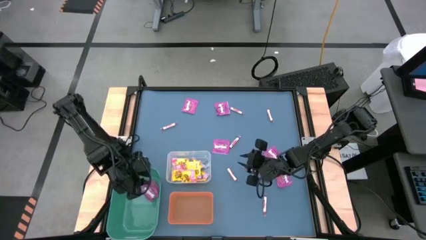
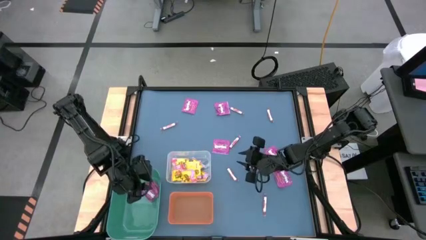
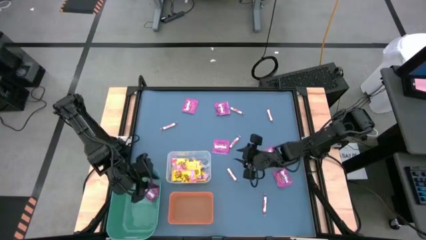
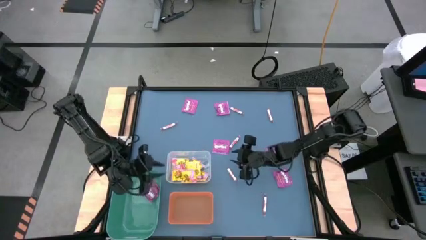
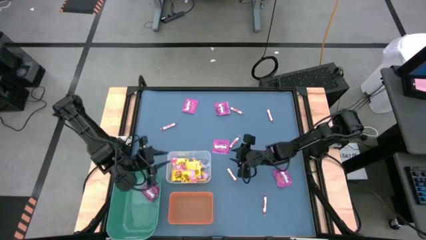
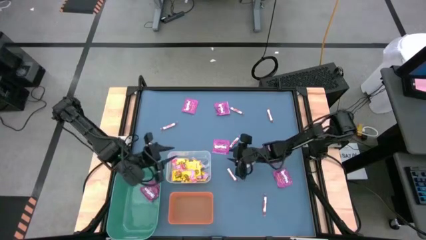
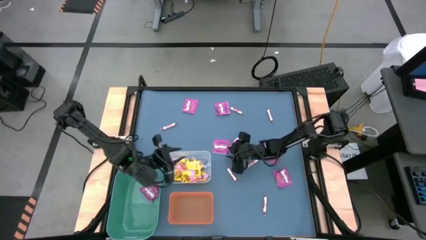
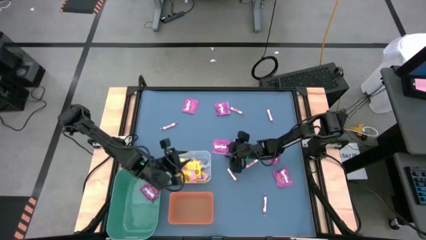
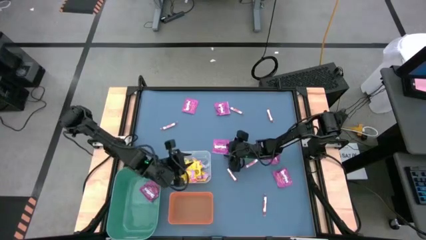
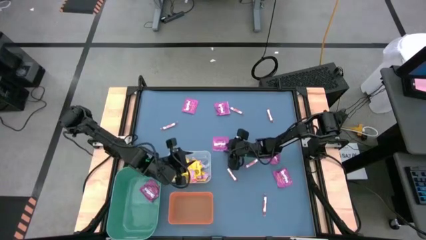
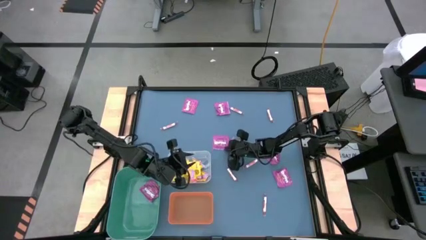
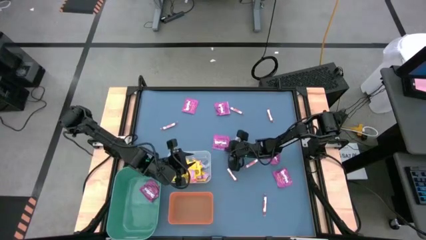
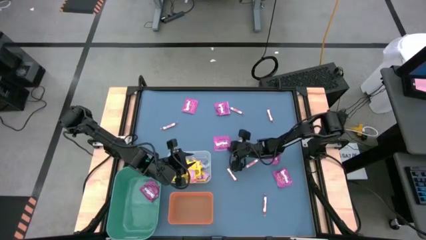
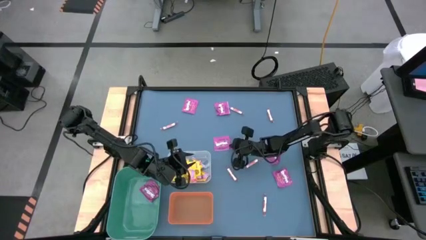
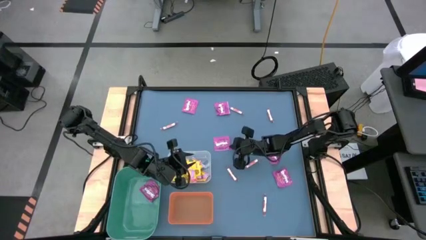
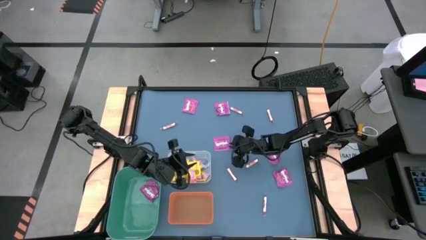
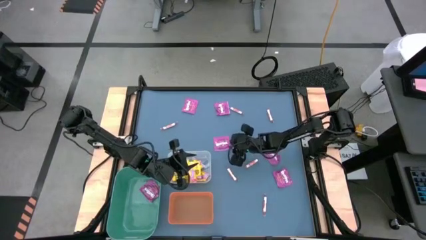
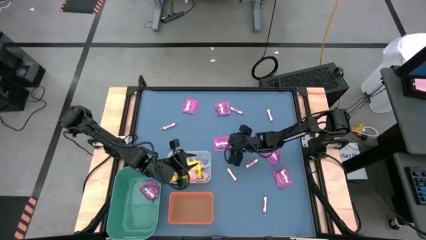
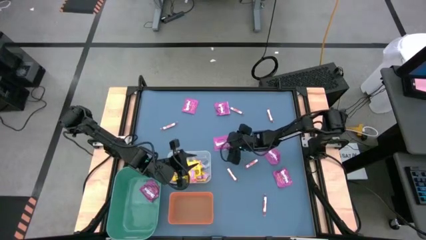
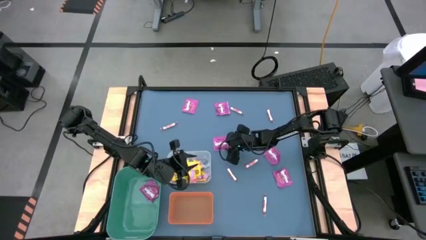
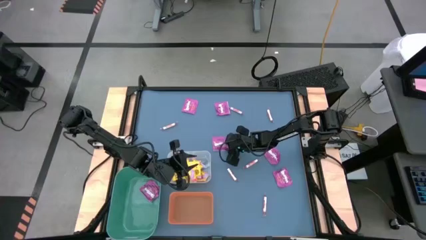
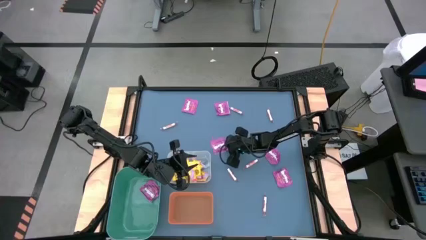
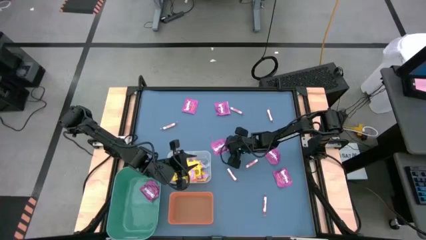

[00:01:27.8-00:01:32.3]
Task: Sort candy
Put the purple candy into the green bin

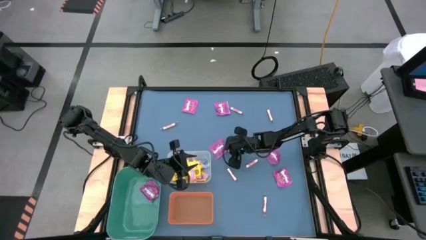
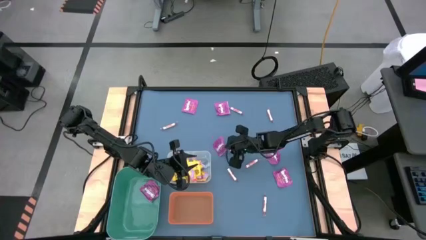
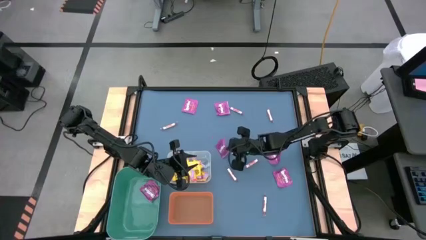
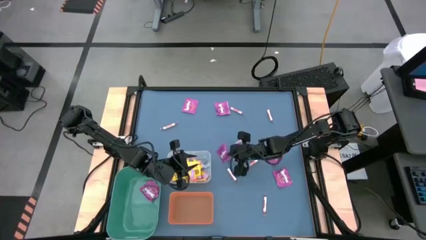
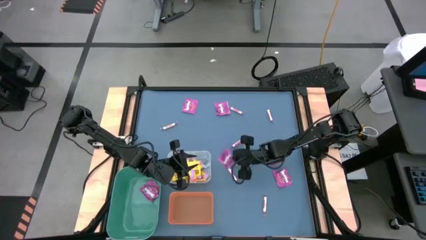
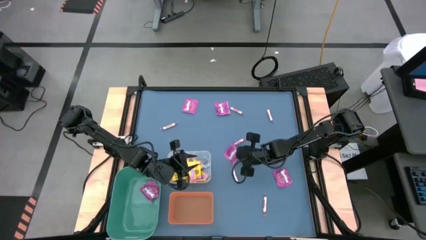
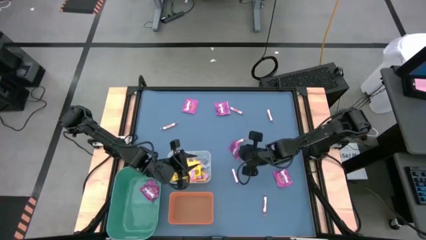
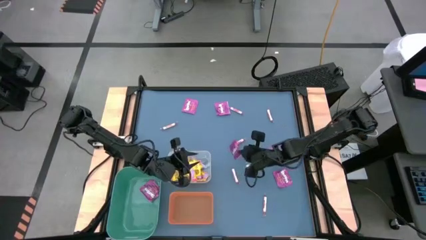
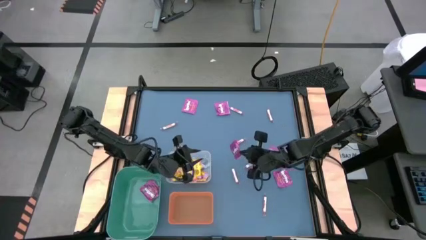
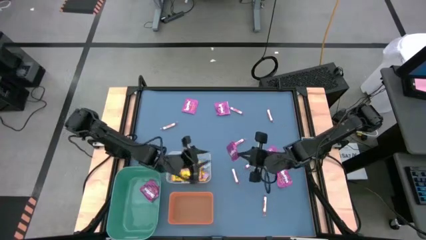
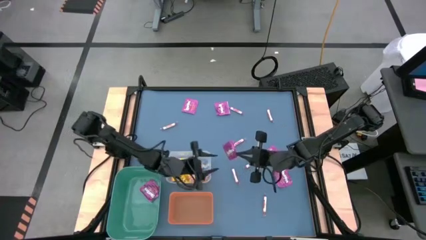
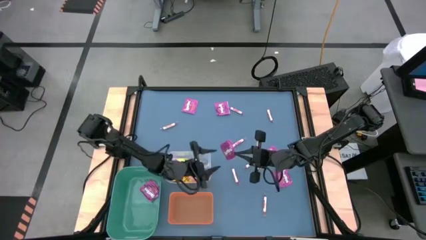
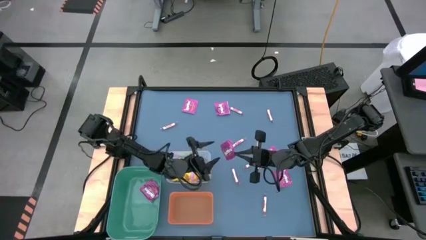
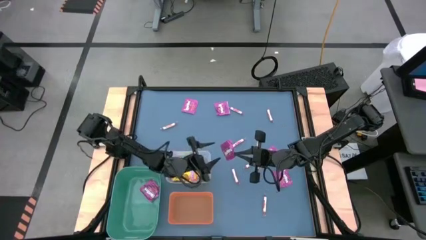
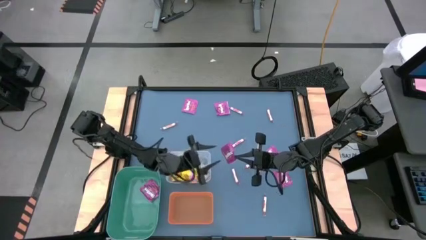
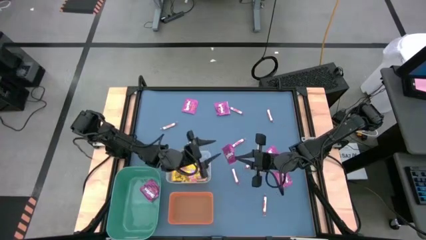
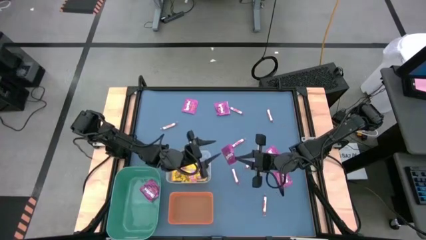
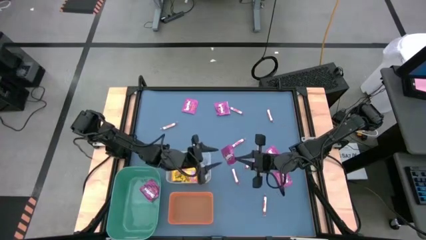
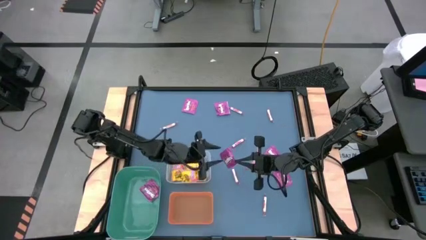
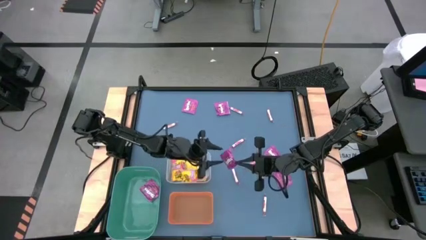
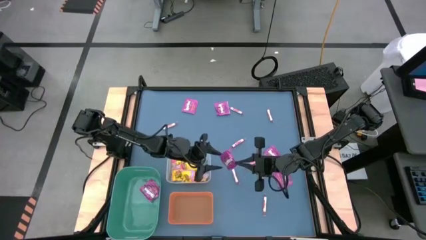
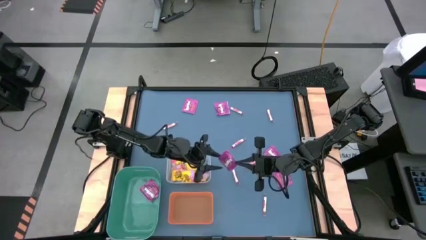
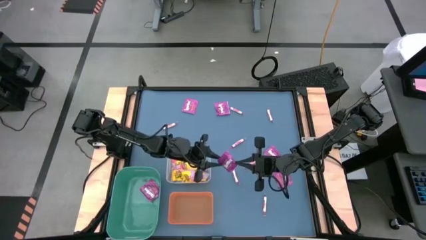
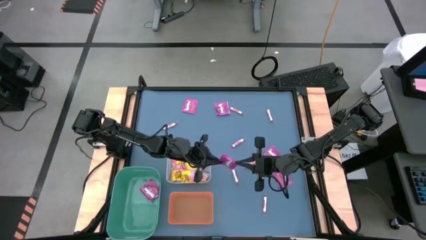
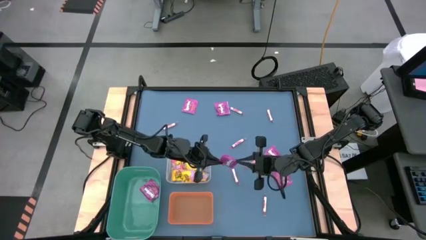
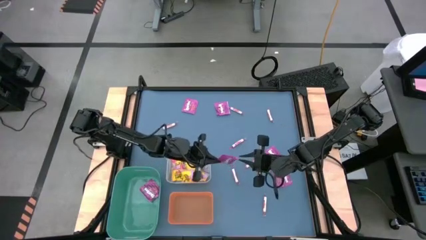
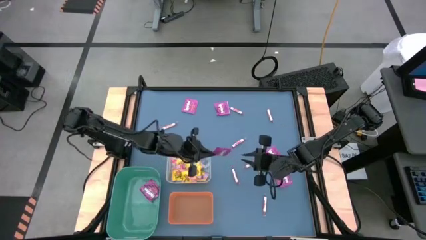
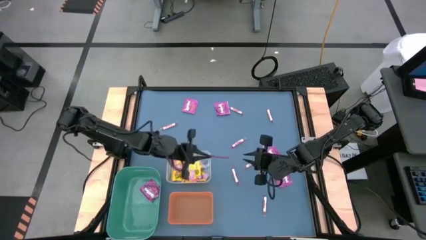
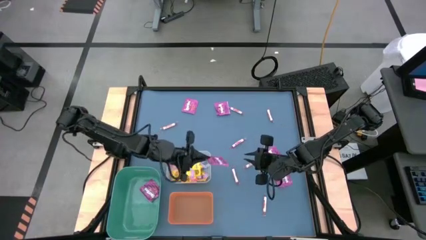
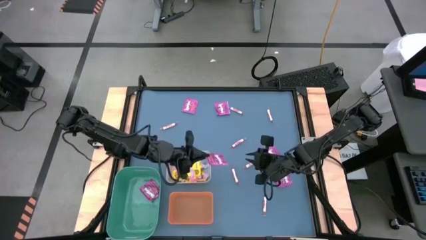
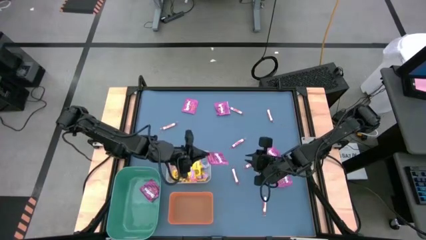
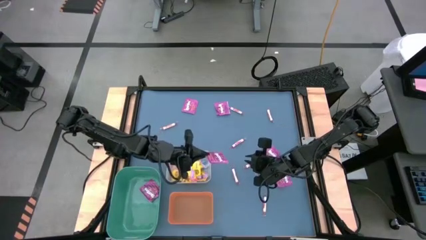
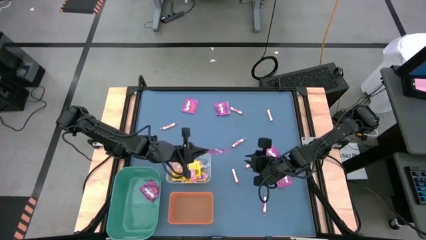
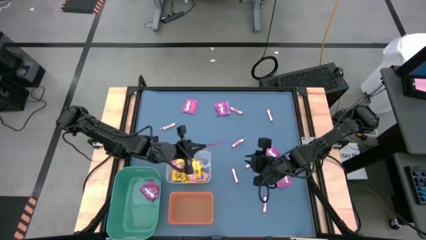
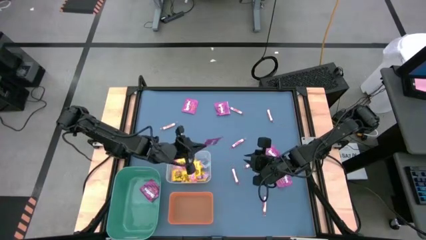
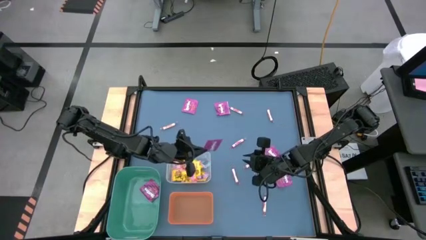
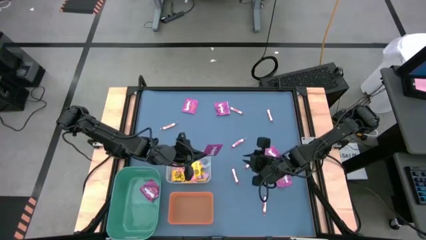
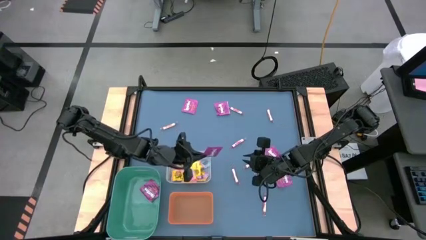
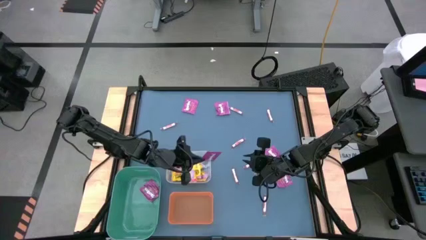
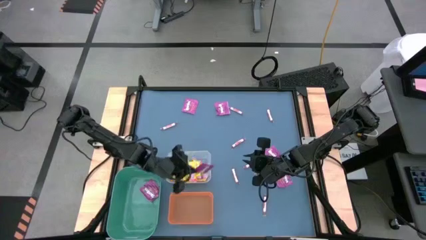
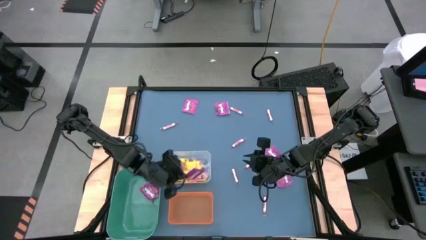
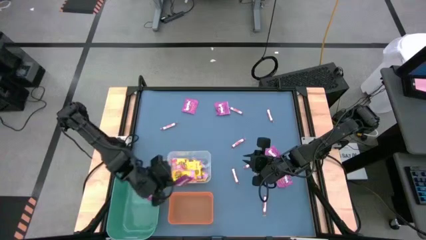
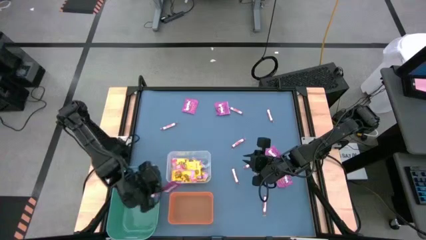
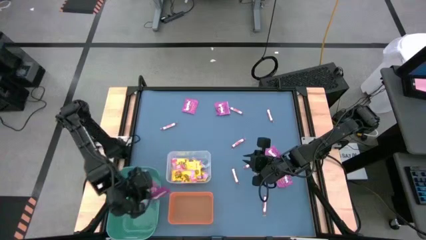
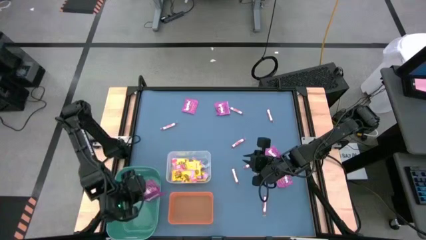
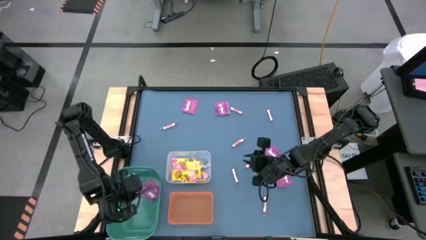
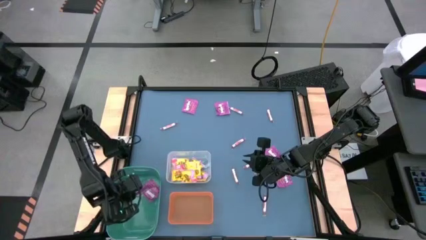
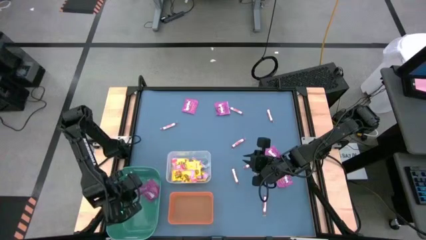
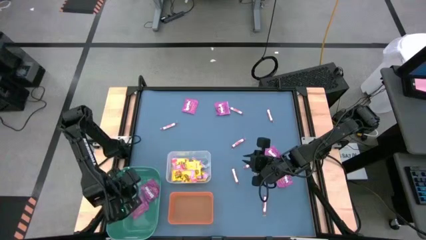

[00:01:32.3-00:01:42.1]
Put the purple candy into the green bin
